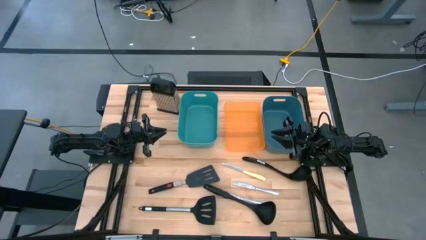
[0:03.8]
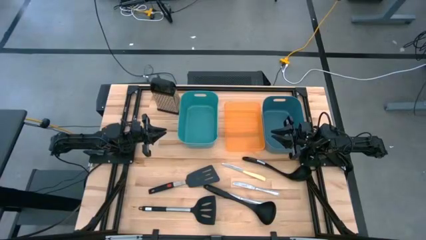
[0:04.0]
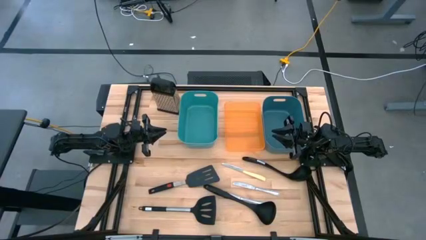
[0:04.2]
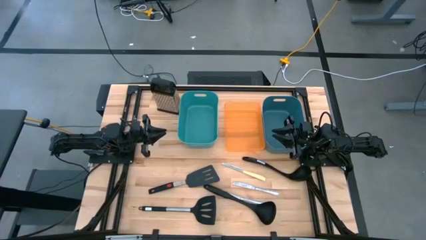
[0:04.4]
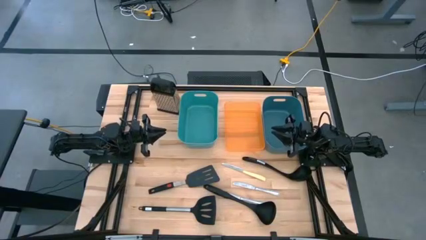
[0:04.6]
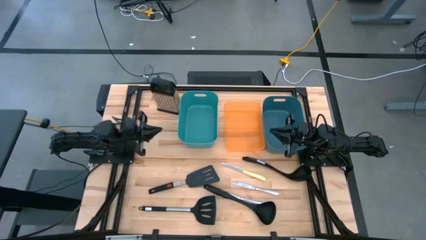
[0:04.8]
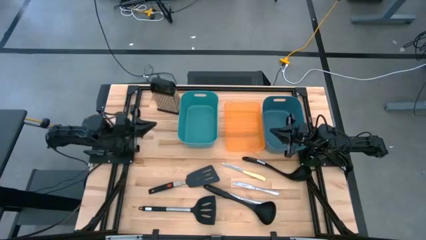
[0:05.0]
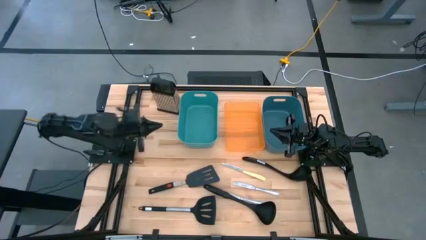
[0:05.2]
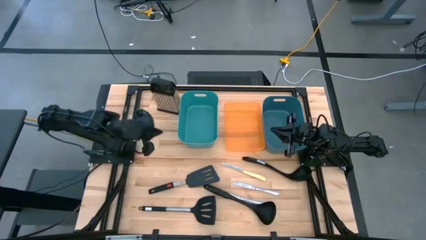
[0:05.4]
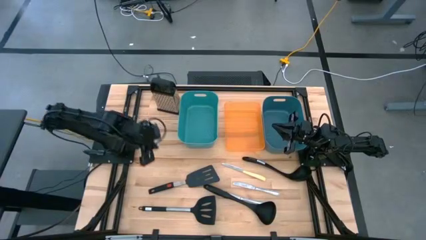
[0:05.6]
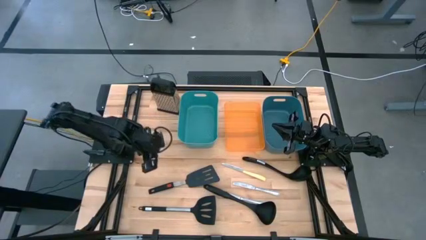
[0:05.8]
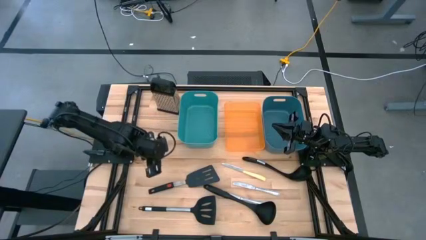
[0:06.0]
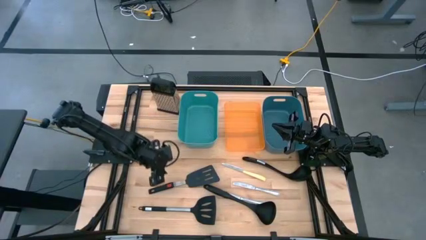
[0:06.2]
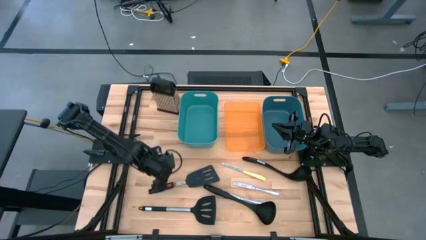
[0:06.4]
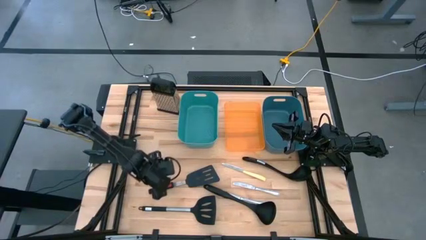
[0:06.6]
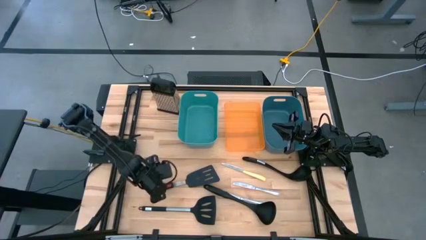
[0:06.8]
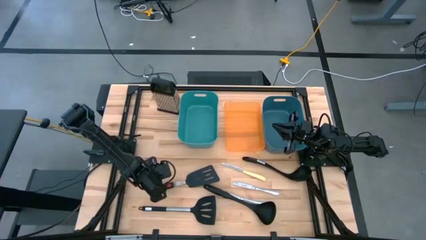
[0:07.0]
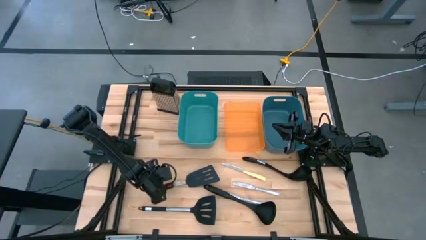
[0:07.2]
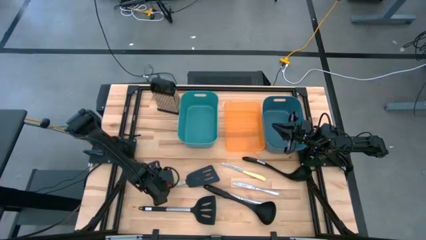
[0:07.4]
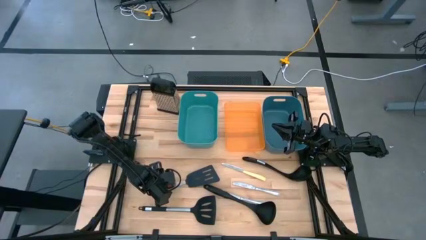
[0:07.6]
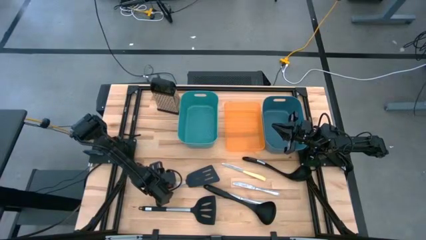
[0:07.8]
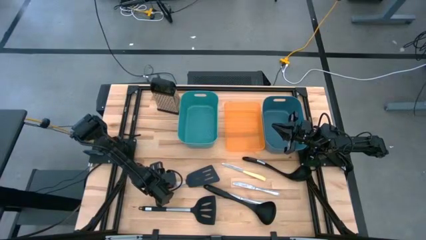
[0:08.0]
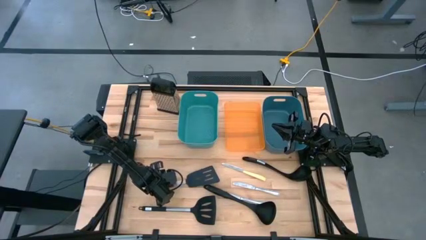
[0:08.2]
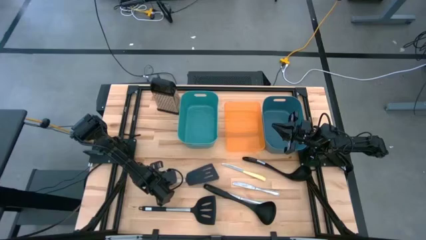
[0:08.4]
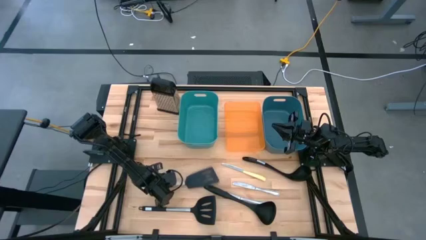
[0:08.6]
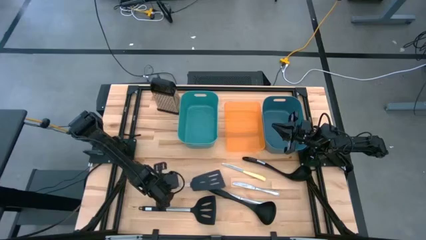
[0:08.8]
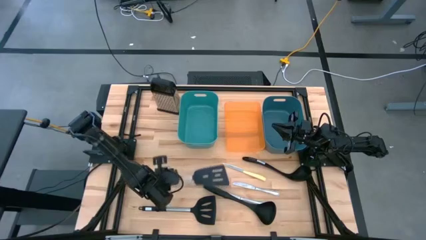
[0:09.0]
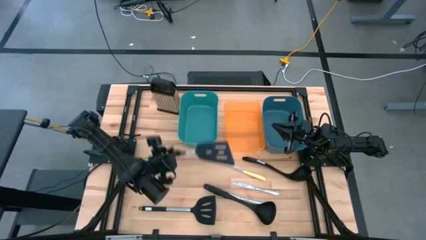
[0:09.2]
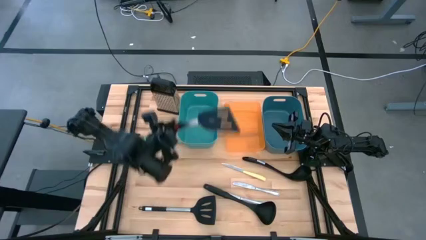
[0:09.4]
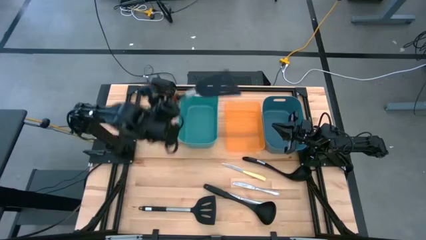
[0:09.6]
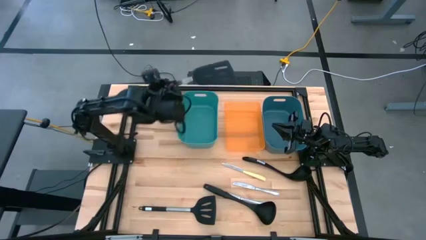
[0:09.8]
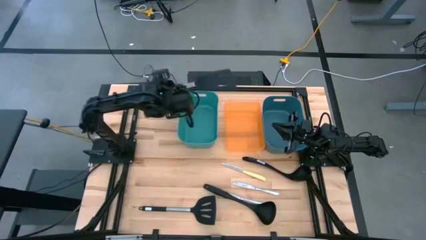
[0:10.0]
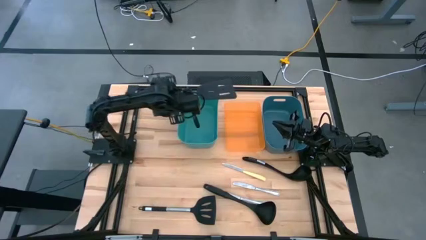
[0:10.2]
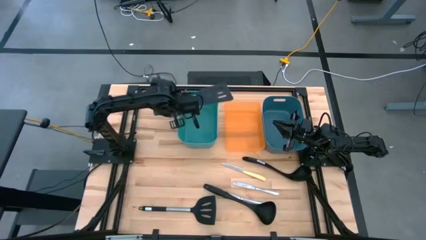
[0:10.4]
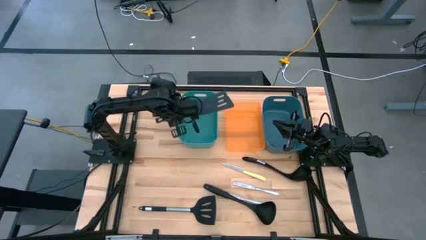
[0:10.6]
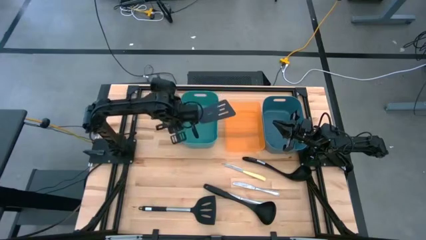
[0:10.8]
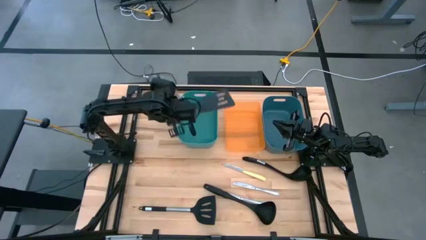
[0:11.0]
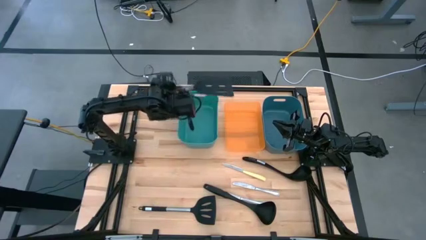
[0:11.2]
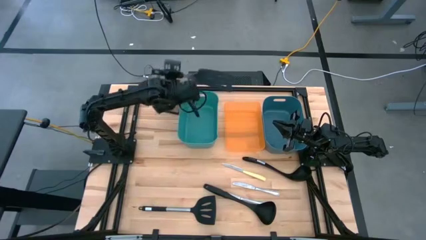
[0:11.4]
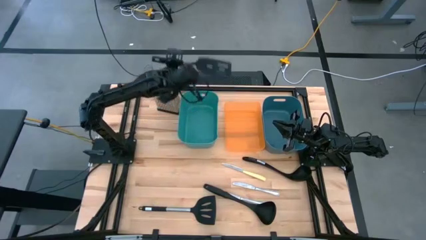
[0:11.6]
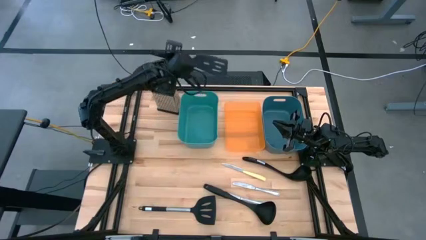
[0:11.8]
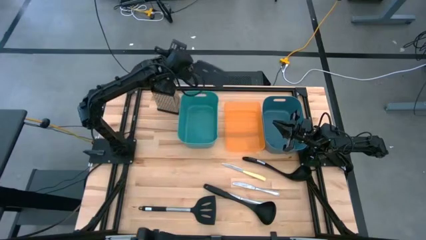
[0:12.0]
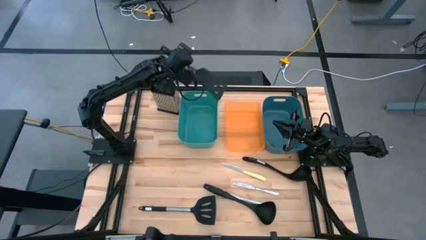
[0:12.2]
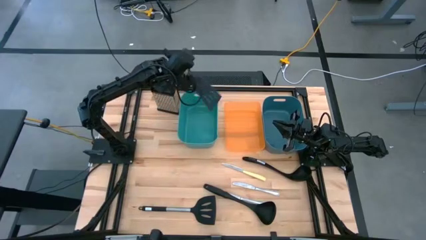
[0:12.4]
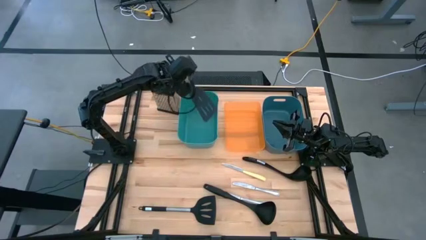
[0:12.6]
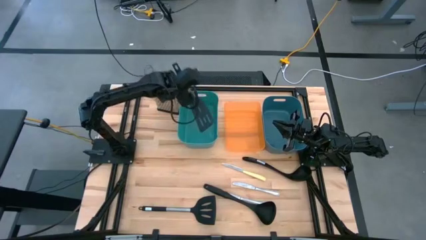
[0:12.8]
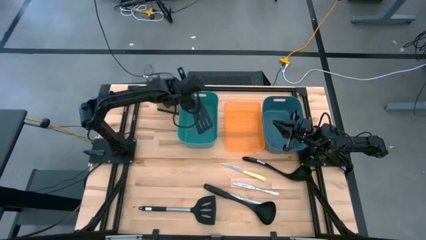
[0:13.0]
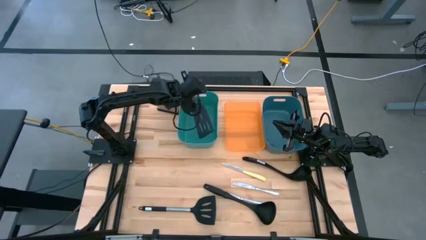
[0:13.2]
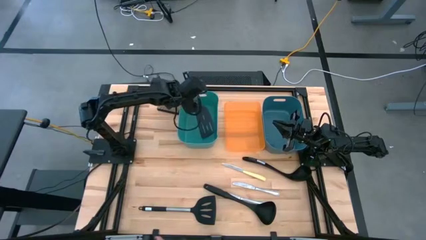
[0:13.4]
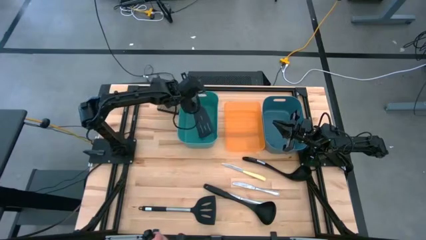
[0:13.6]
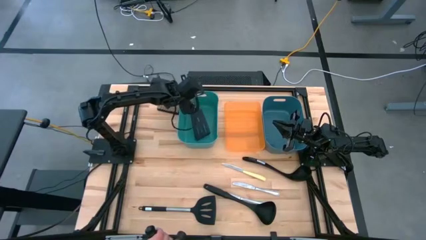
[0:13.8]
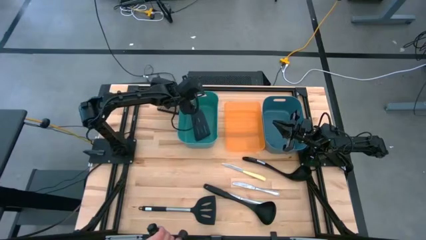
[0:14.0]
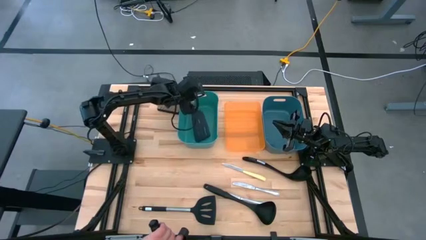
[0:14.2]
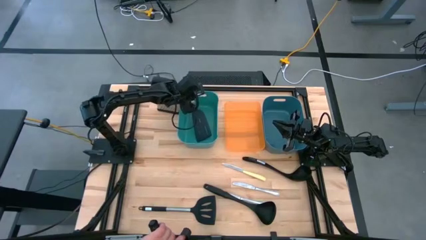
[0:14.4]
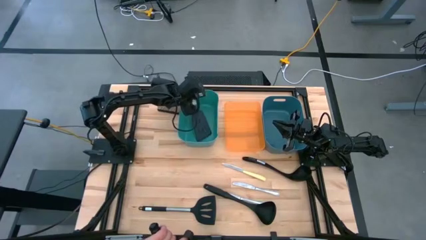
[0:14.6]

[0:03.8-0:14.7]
Task: Pick & Place Kitchen Items
Put the top black spatula into the green bin
